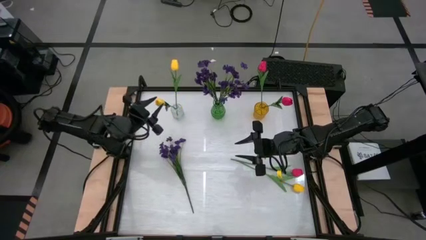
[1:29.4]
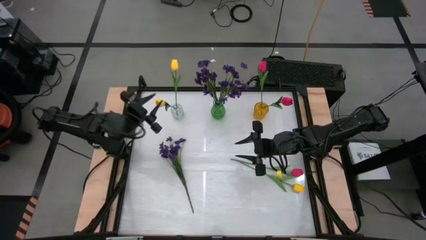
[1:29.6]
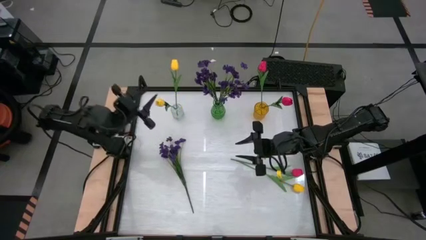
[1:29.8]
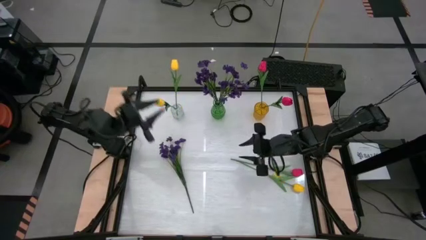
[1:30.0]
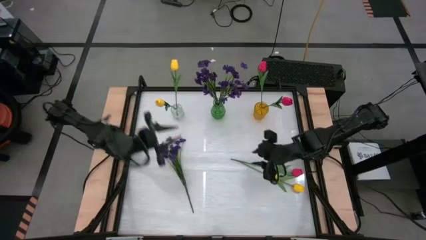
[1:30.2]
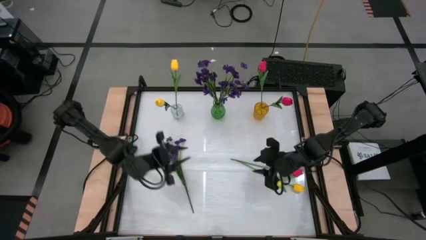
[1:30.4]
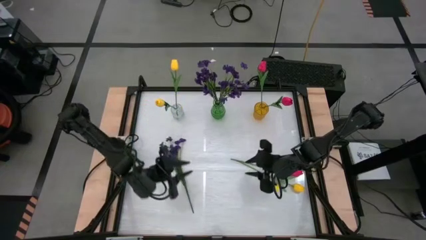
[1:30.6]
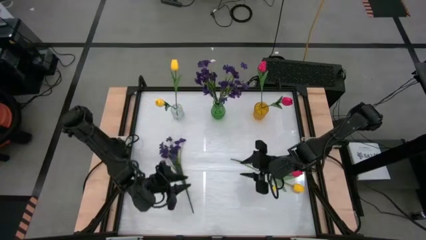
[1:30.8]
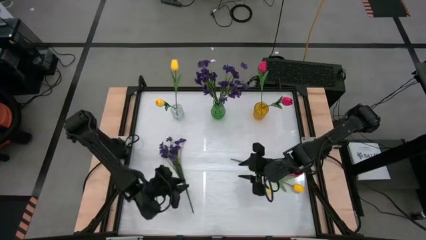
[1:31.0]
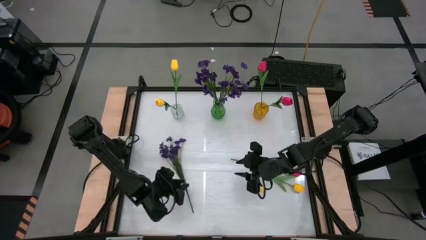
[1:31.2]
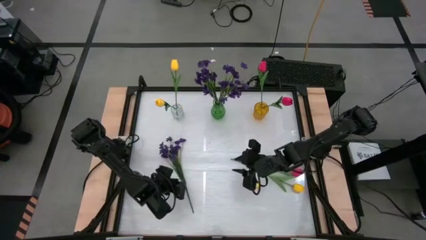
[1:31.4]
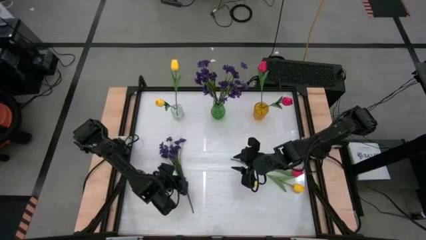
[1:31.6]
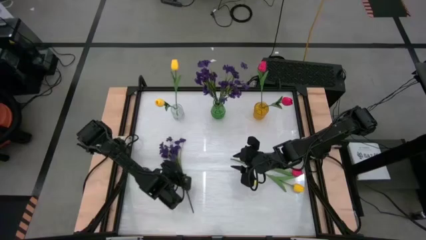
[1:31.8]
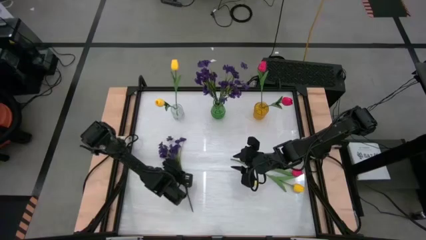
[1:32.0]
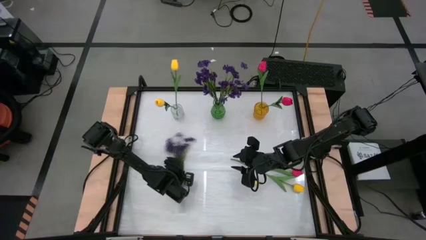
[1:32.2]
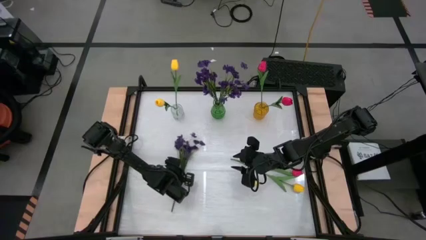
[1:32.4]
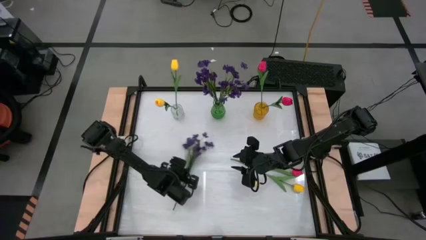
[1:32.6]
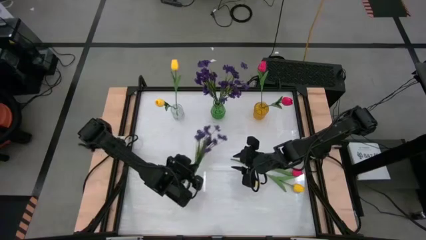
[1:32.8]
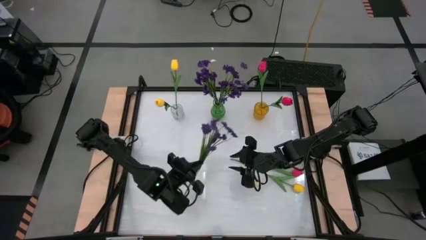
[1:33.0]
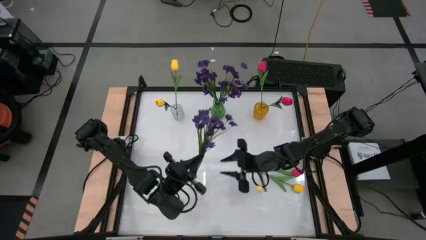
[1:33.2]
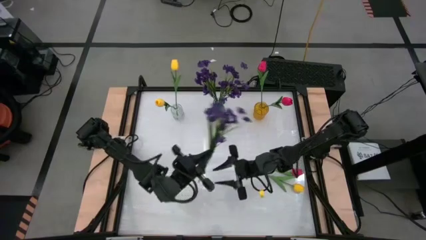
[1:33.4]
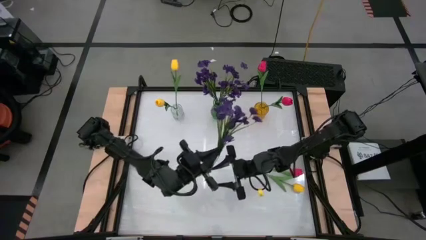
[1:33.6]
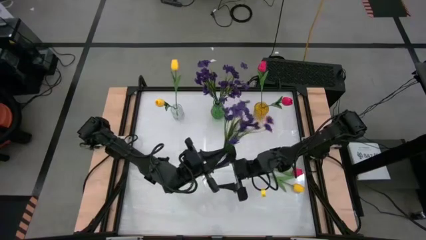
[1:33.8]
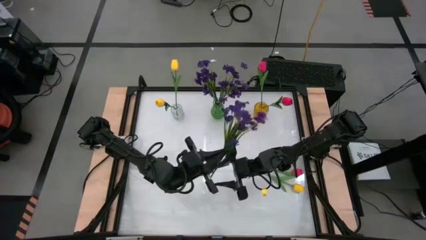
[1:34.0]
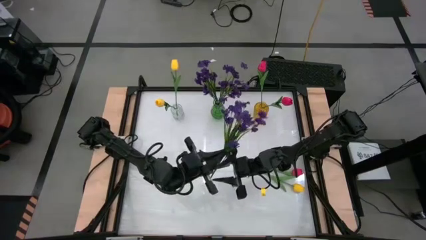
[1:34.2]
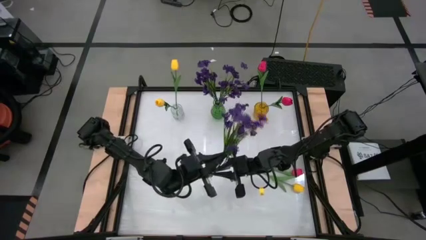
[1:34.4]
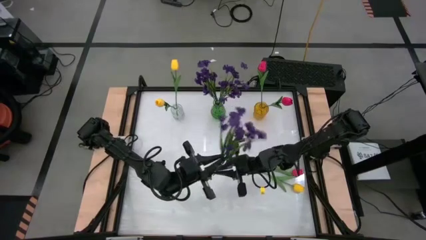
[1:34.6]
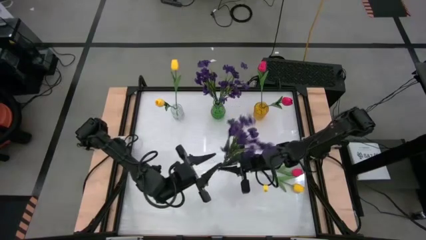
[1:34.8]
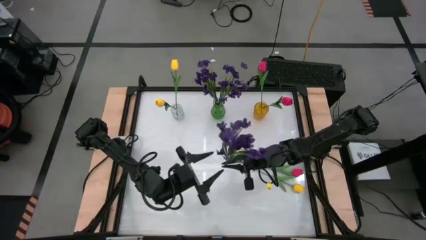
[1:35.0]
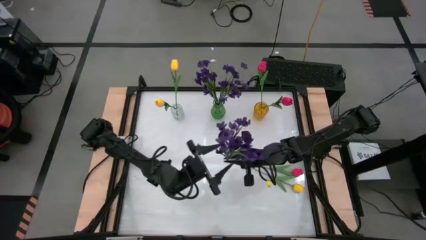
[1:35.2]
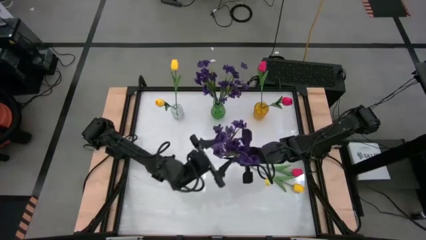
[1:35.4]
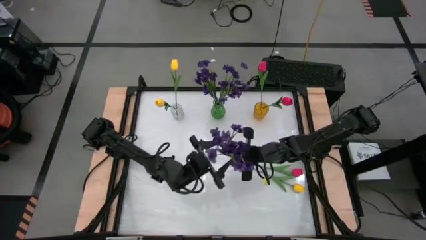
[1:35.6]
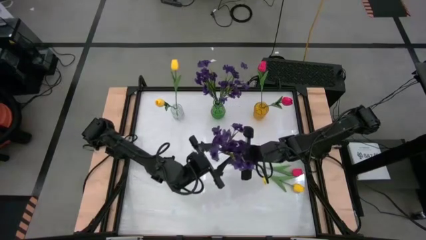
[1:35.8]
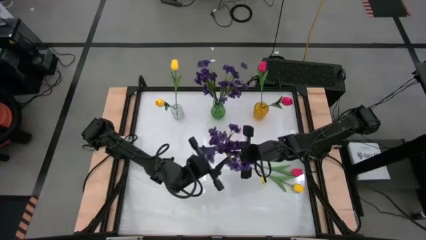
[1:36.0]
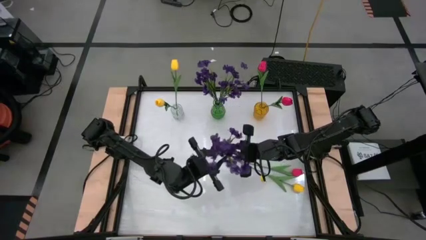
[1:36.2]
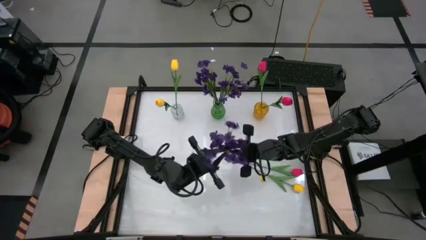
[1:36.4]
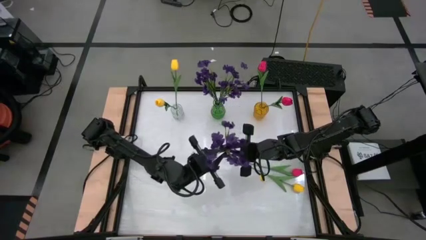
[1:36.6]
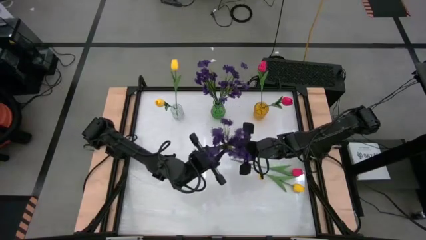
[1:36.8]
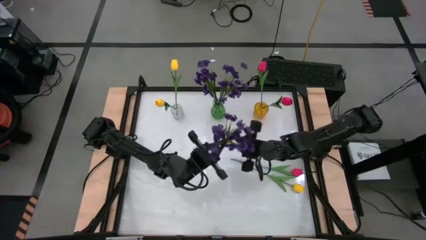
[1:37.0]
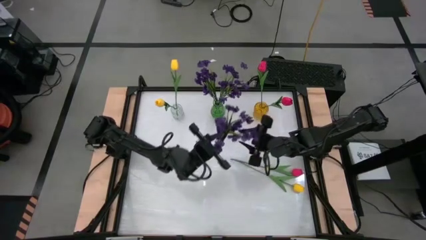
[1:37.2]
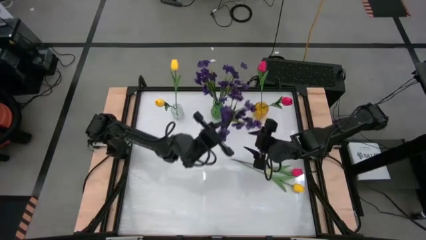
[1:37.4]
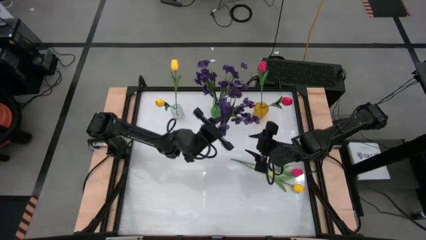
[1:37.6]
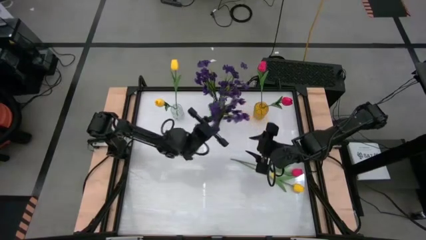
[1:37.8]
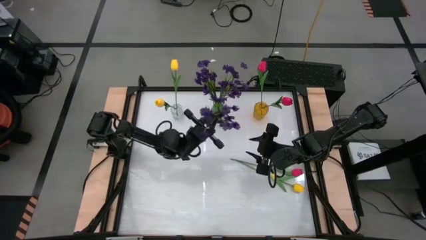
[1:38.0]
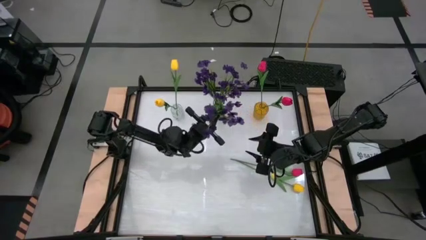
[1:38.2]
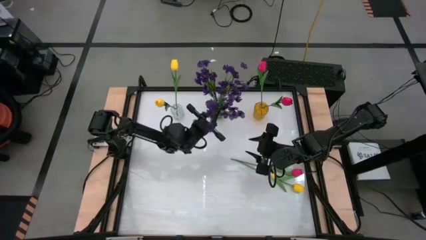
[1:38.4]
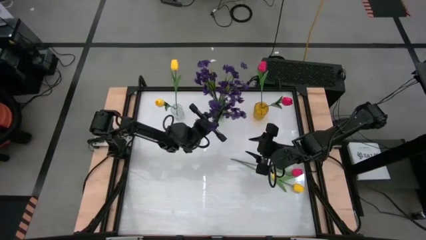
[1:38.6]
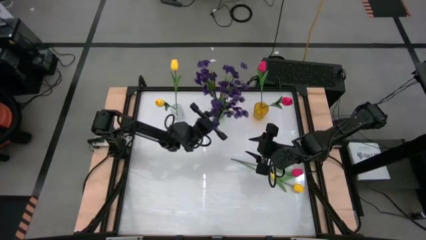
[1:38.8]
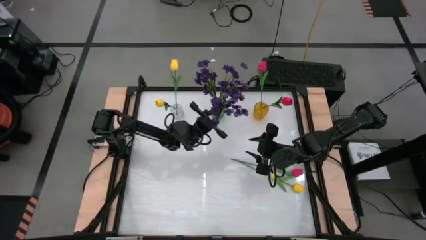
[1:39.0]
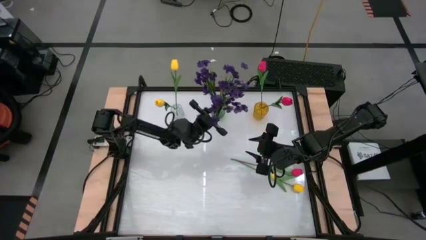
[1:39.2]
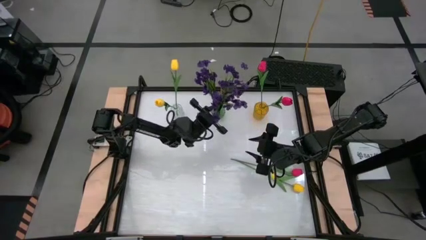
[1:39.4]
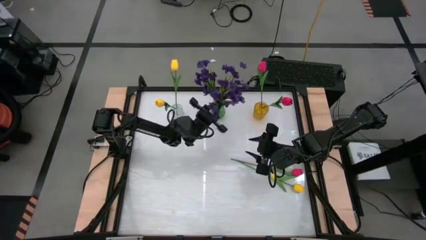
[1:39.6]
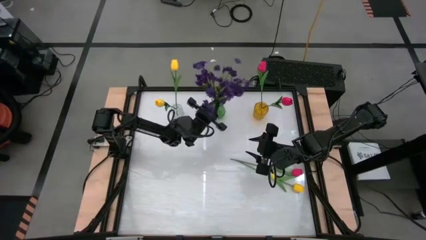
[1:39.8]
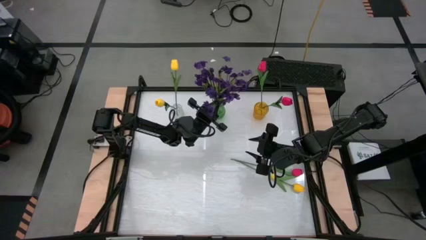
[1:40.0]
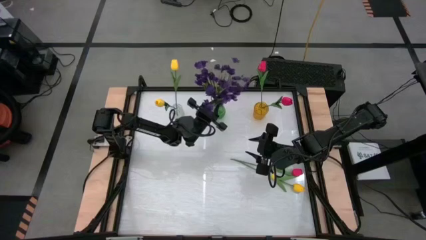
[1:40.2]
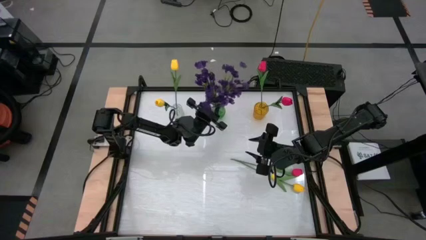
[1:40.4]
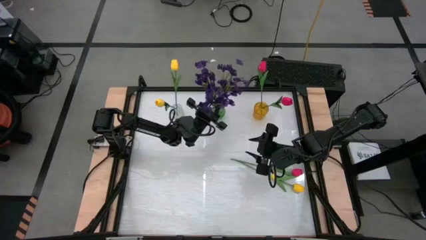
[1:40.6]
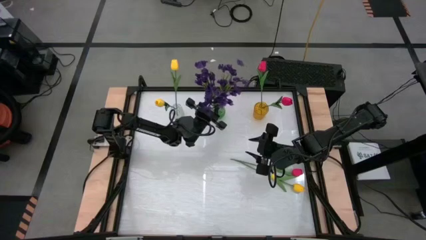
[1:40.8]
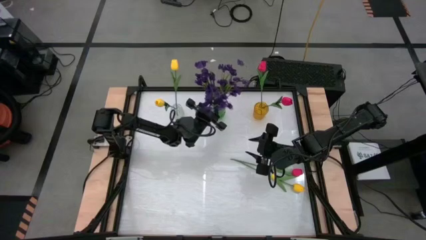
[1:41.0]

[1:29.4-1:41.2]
Task: Sort flowers into vase by color
Put the purple flowers into the green vase
